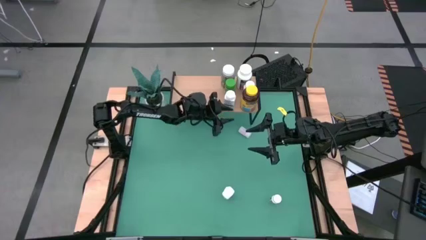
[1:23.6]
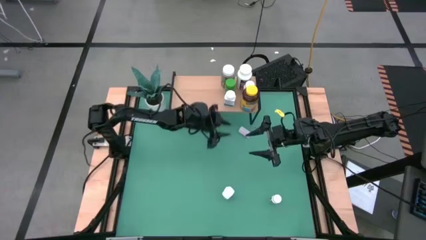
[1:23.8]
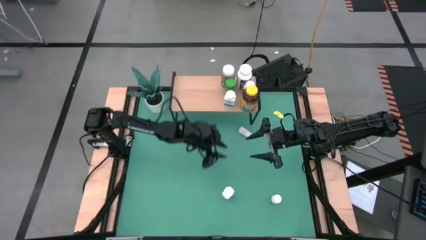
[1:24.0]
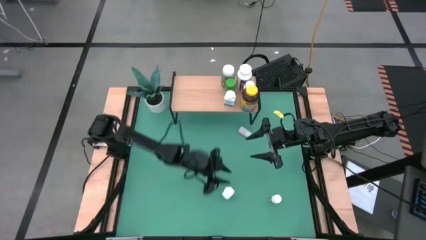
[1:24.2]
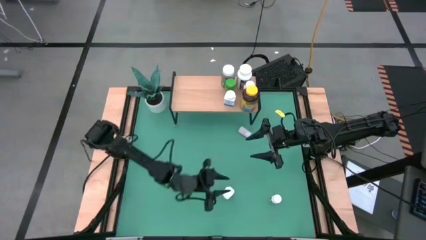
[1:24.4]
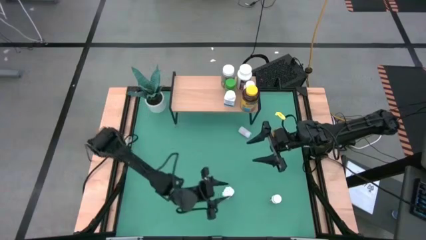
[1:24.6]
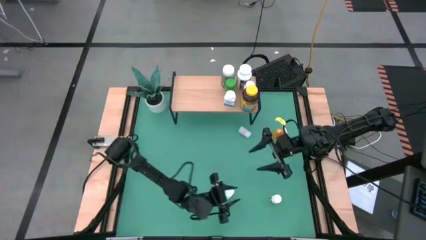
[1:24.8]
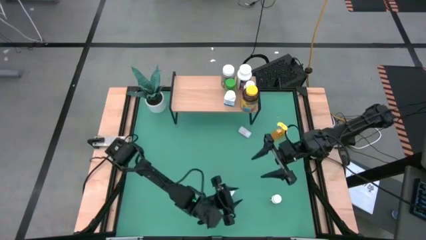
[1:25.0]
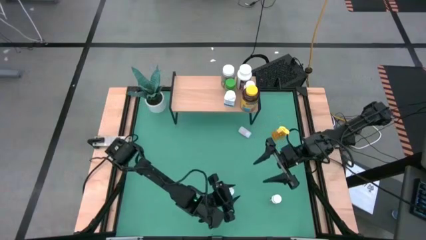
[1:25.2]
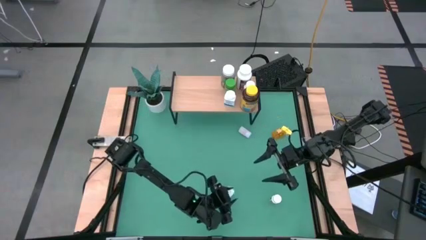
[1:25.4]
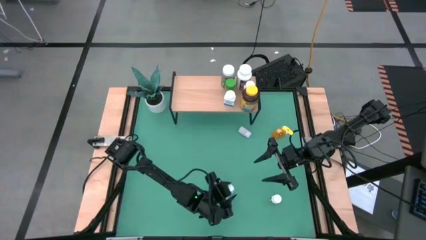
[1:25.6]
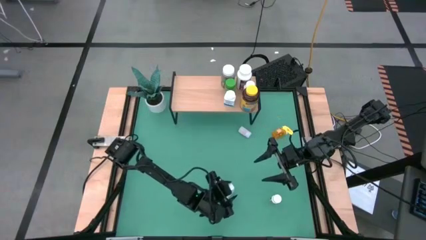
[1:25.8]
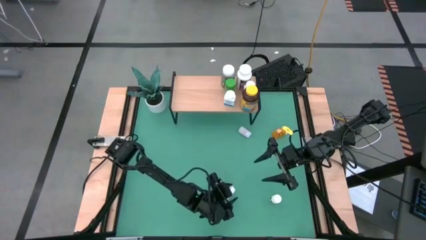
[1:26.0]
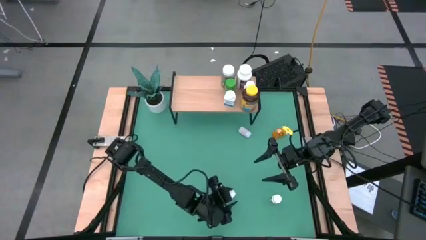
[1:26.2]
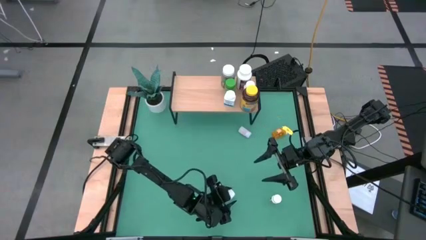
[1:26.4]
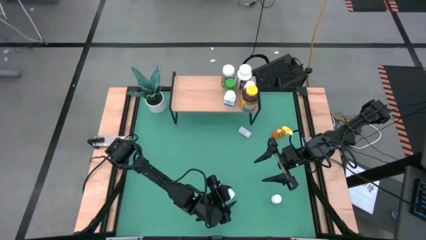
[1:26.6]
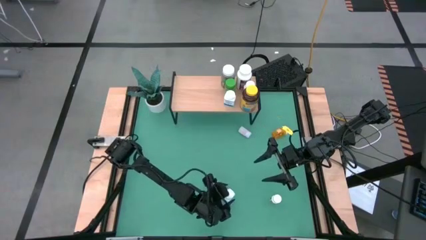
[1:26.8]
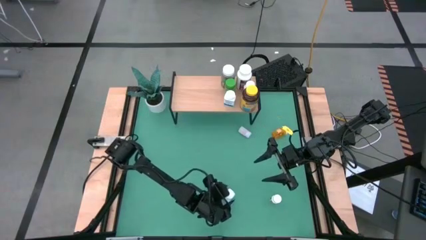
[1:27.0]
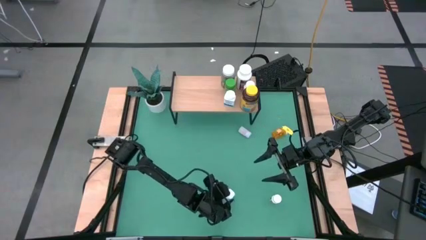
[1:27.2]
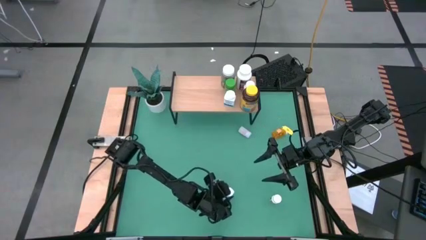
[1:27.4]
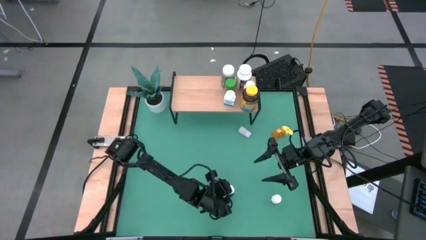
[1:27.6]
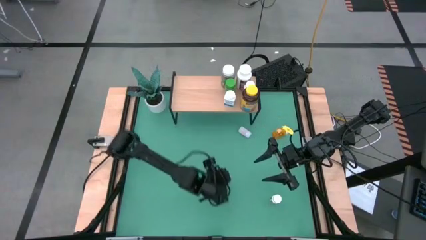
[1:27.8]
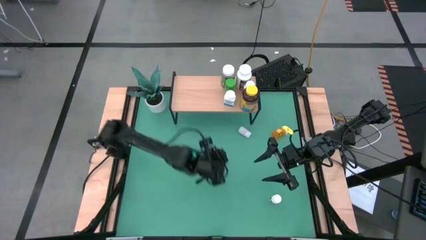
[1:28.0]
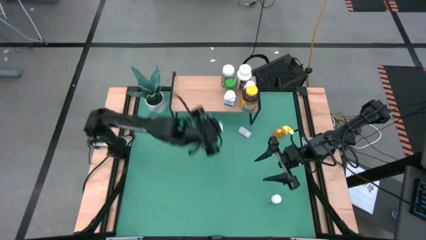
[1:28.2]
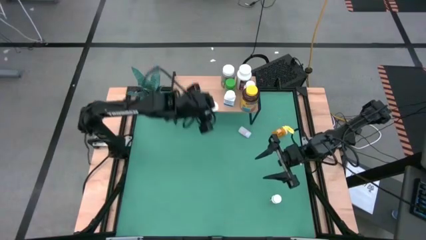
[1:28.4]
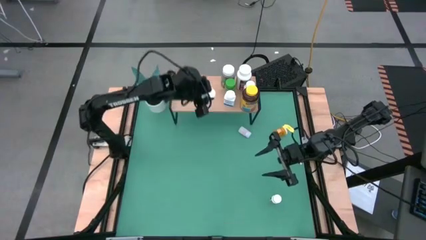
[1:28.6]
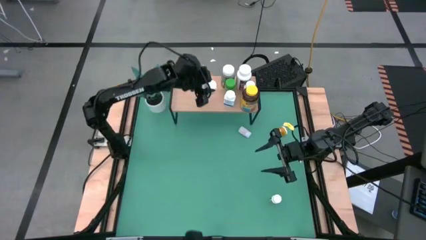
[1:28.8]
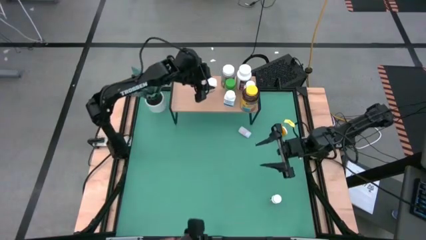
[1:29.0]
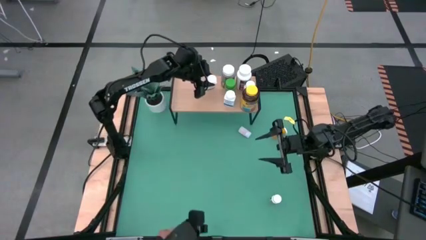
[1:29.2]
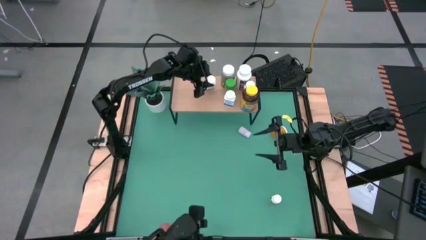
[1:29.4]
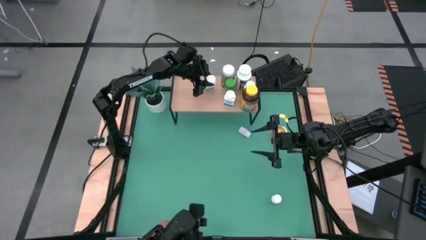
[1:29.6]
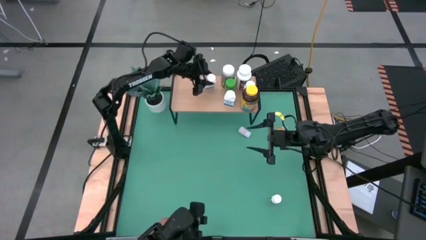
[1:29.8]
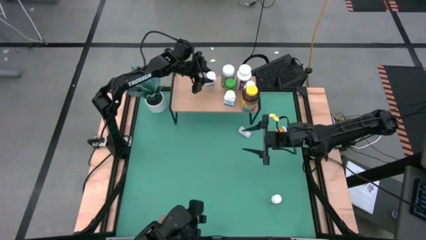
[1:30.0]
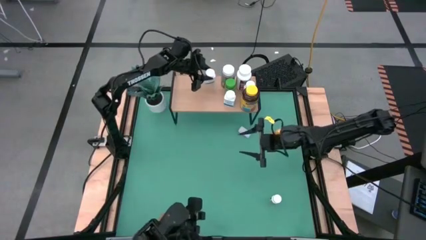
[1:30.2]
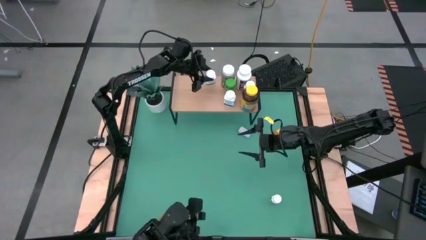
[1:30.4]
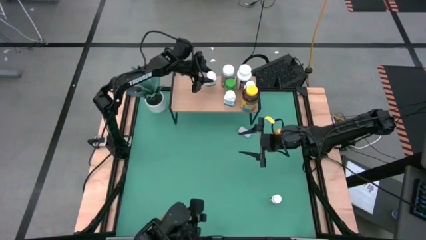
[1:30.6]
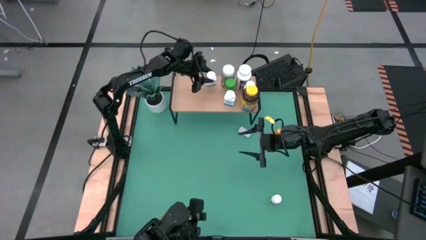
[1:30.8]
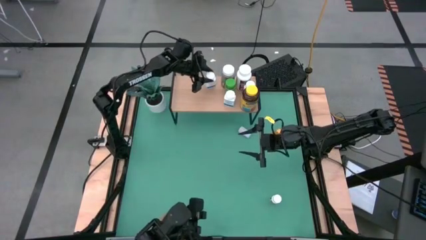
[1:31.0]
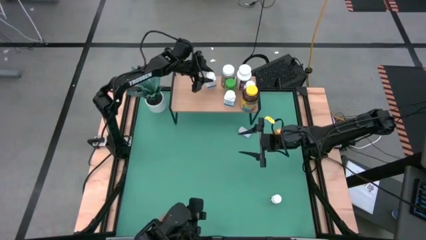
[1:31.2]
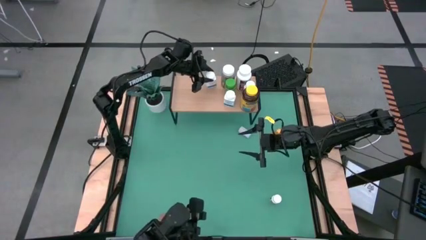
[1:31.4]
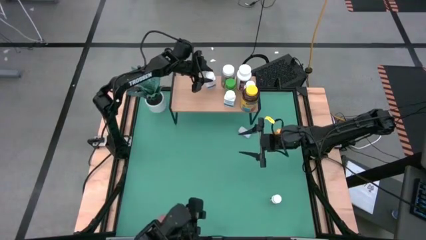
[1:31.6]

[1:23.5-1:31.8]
Task: Pick and place medicine bottles onto shelf by color
Put the white blue medicine bottle on the shelf

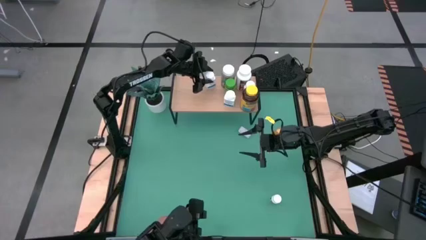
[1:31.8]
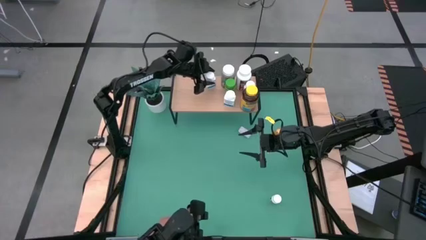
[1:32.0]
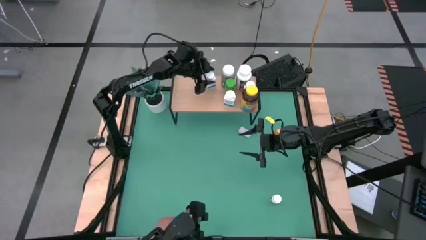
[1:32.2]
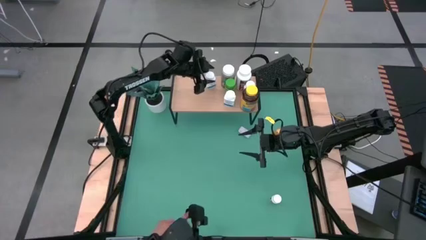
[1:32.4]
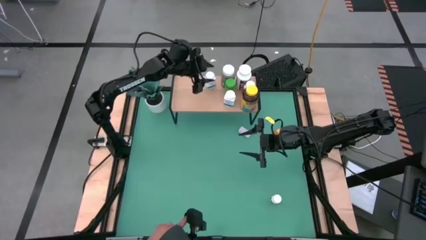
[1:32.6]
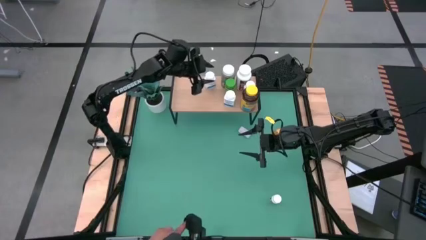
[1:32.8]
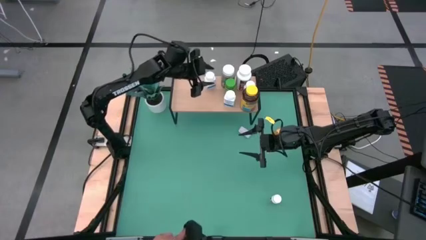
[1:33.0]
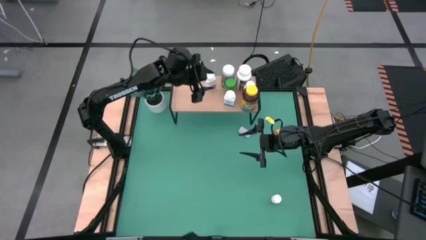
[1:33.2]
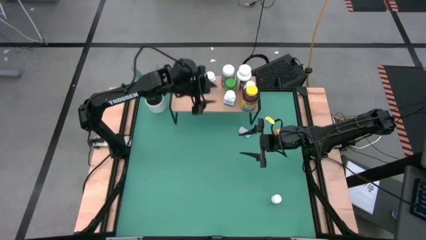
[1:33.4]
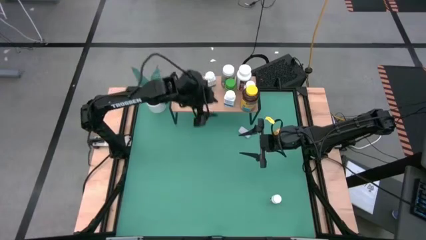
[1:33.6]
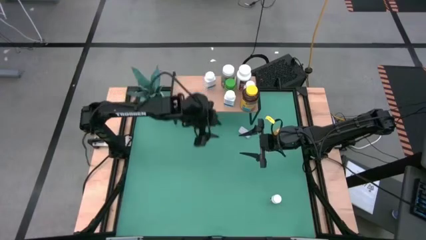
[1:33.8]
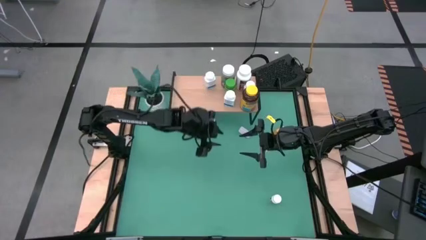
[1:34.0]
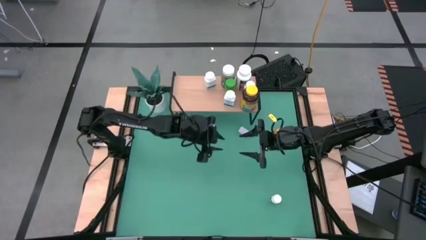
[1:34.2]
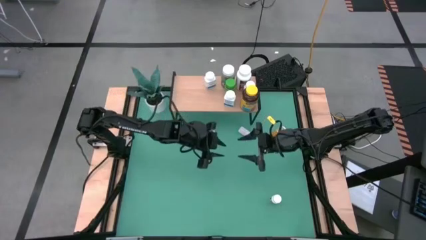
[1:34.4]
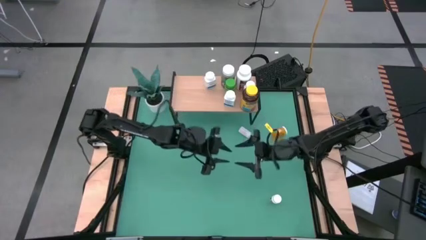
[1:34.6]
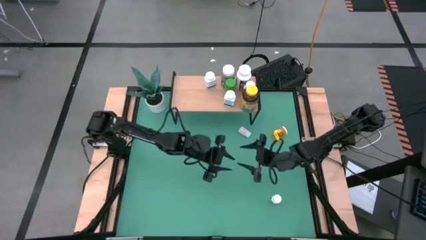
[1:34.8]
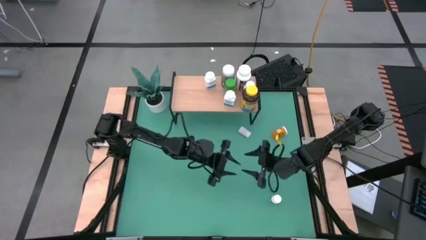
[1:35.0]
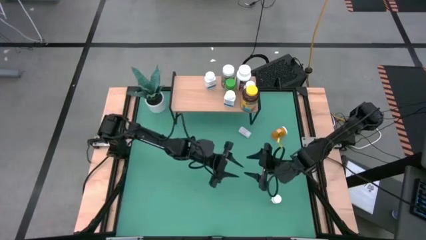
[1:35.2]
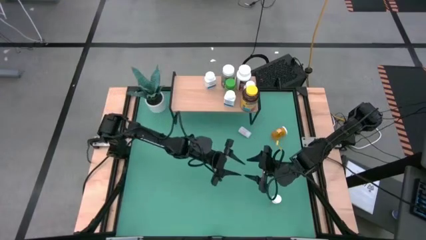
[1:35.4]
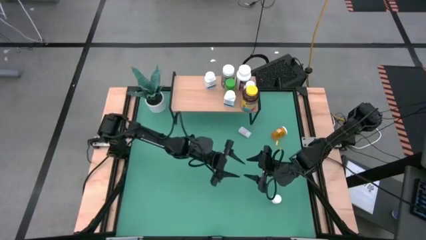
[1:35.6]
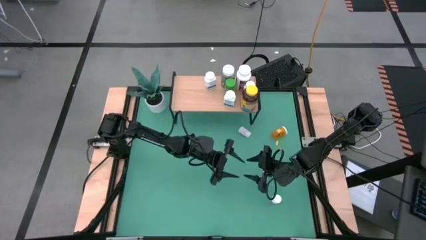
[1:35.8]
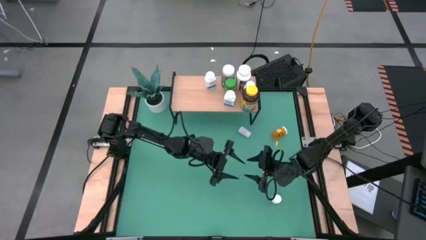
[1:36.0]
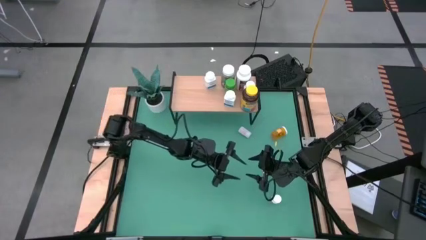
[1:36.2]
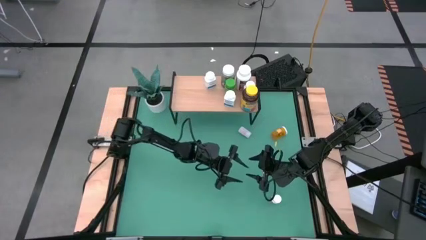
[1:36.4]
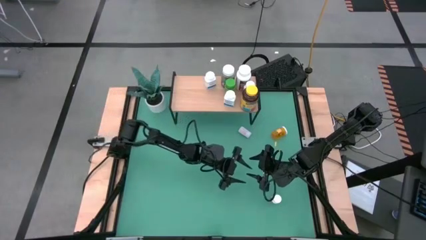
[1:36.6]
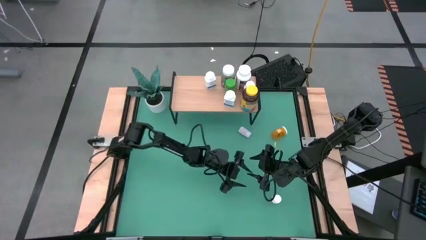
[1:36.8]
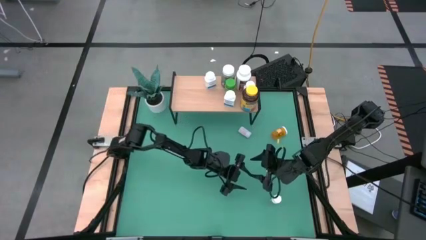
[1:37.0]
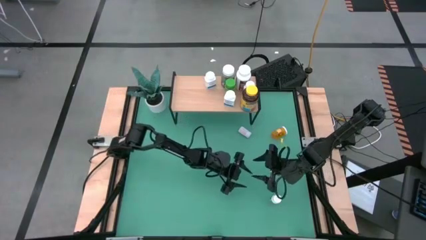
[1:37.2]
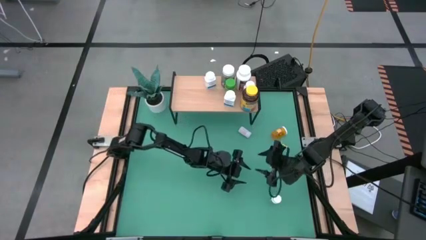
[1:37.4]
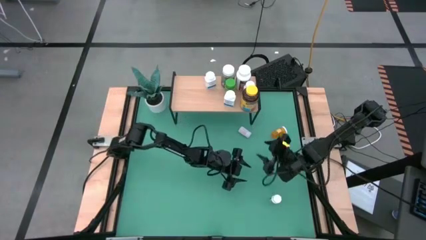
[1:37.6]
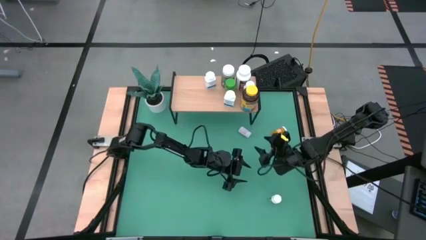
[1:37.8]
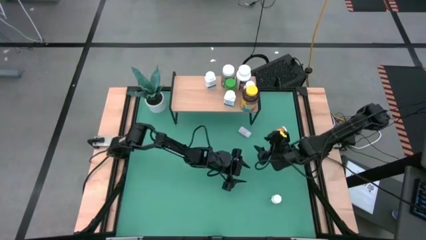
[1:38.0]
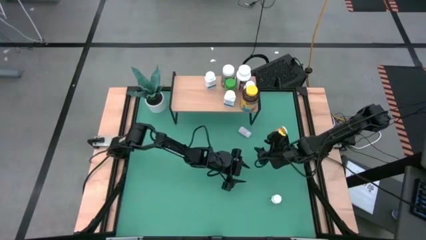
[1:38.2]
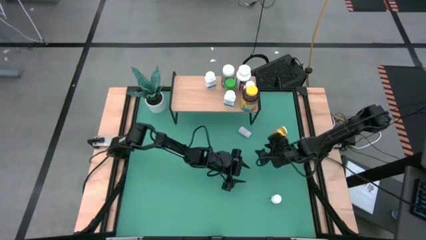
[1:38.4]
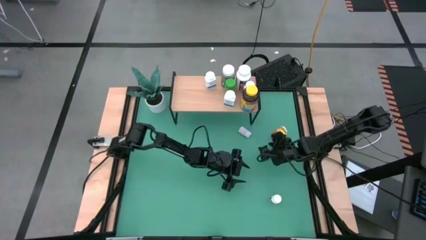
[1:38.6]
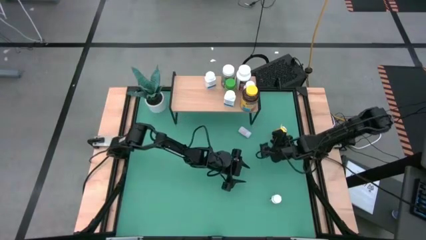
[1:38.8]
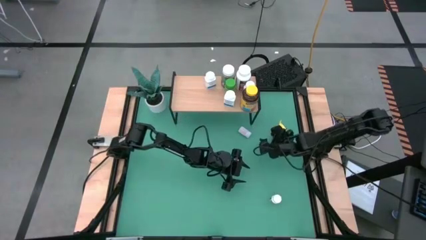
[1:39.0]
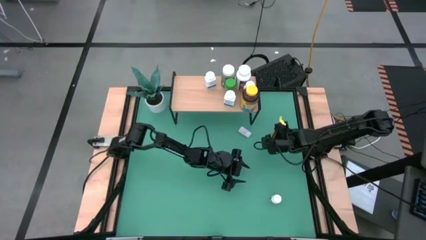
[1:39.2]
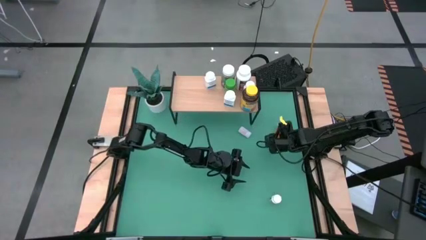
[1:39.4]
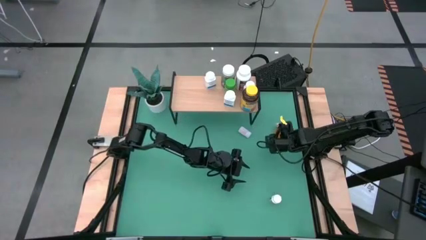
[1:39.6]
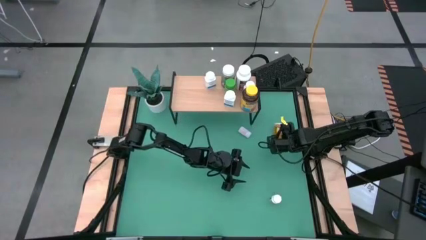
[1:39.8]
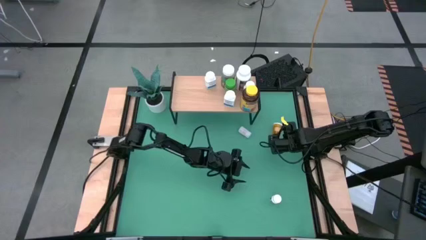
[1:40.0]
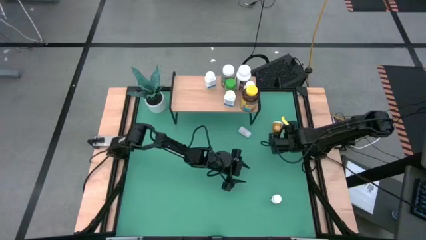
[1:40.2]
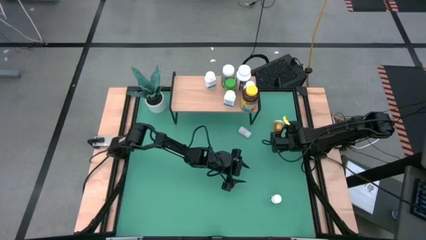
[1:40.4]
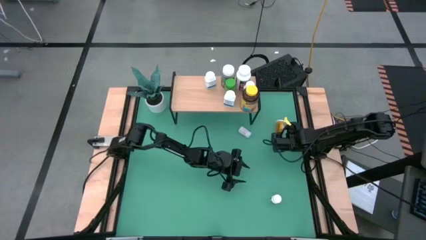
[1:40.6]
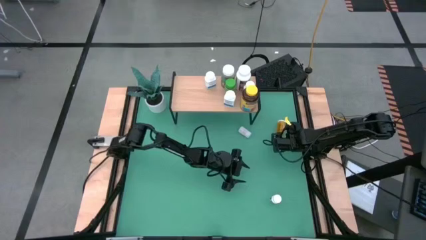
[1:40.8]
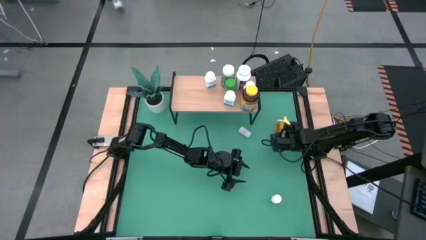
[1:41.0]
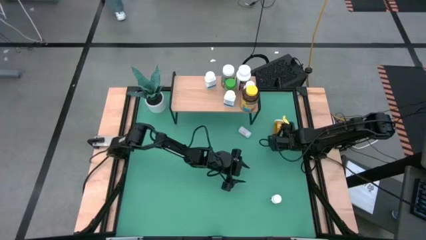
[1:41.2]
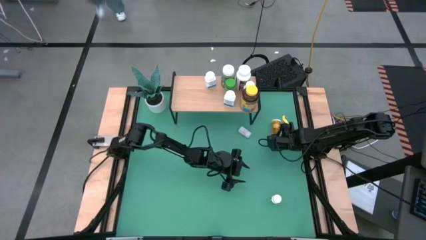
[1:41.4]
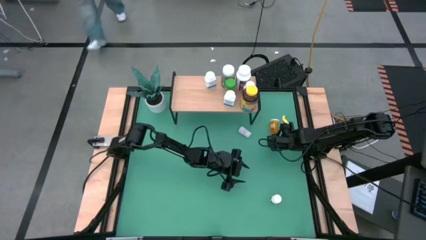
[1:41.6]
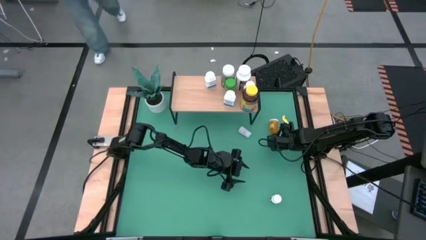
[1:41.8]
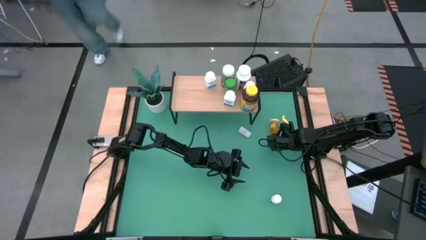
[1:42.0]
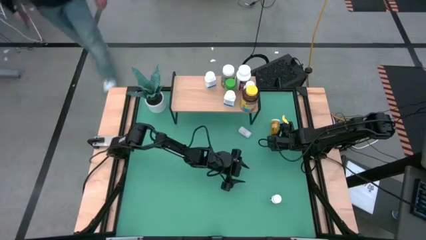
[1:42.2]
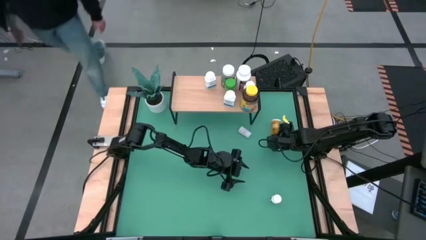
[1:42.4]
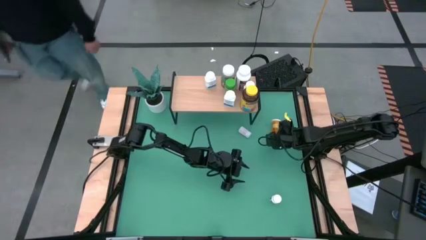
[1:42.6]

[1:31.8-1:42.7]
Put the orange pill bottle on the shelf
